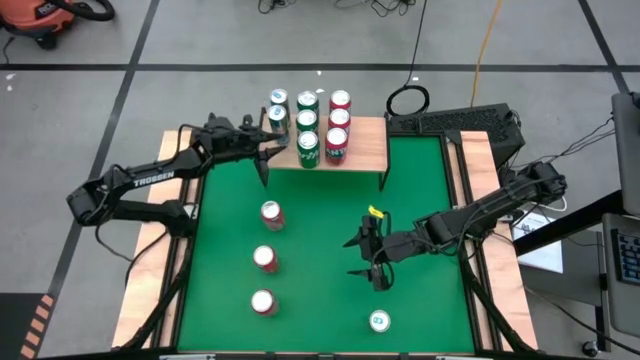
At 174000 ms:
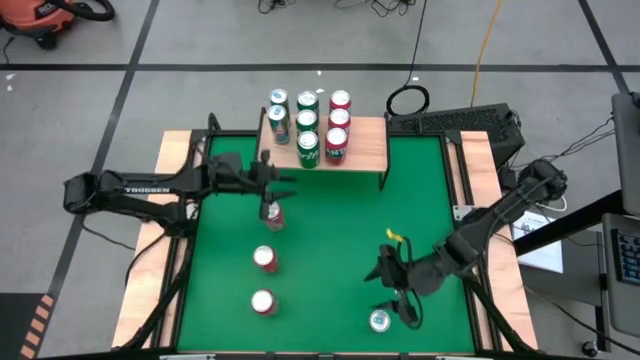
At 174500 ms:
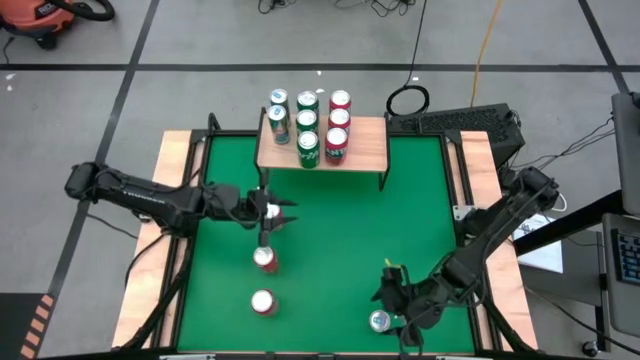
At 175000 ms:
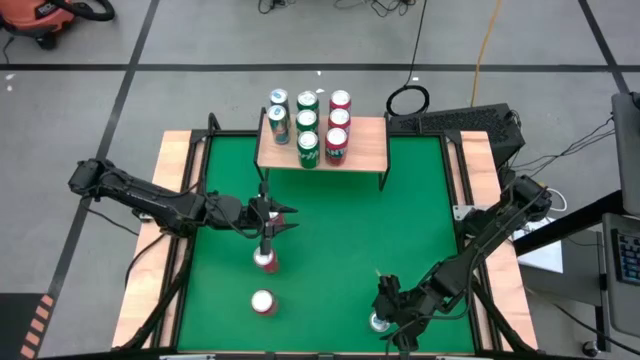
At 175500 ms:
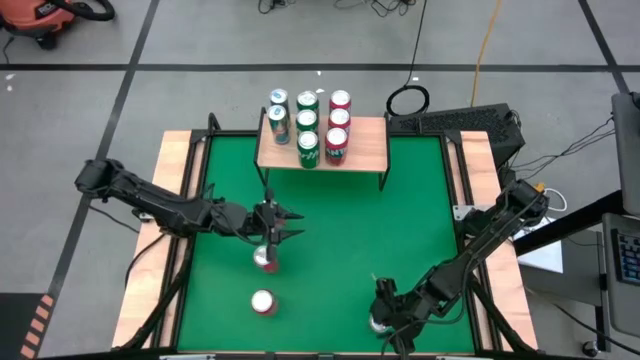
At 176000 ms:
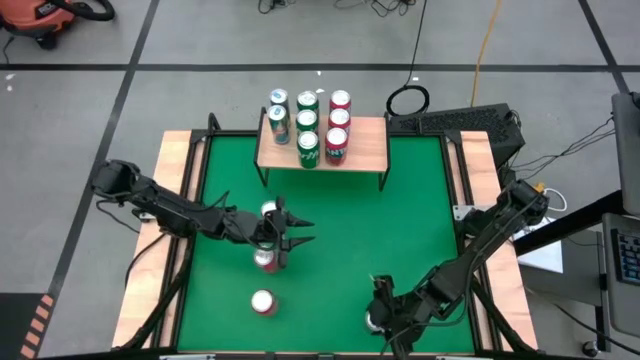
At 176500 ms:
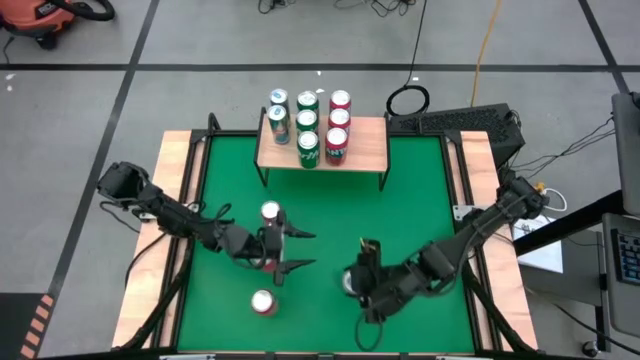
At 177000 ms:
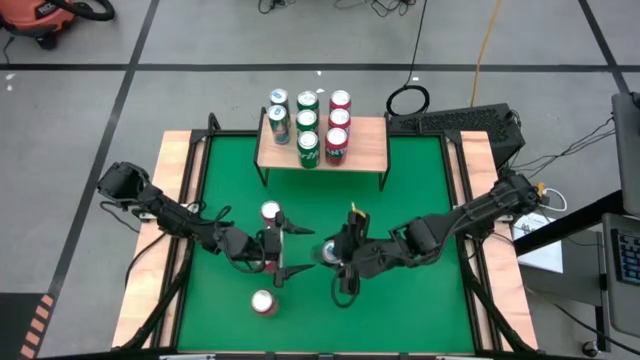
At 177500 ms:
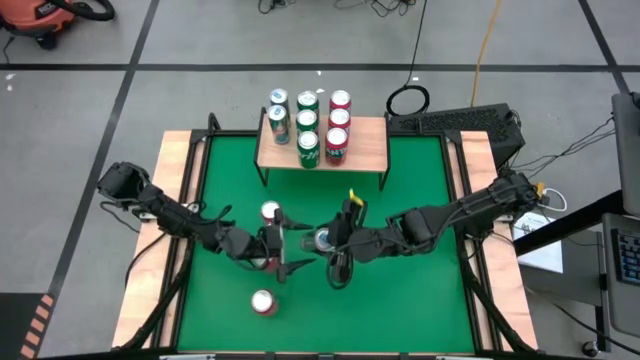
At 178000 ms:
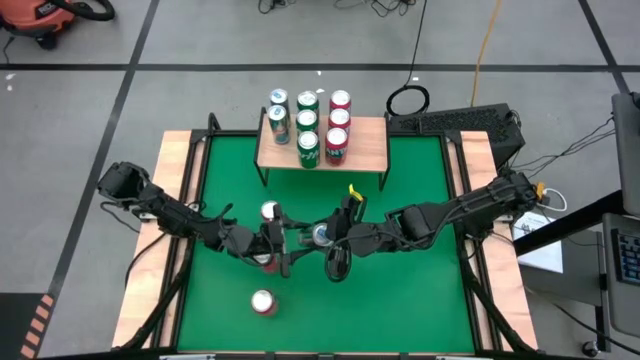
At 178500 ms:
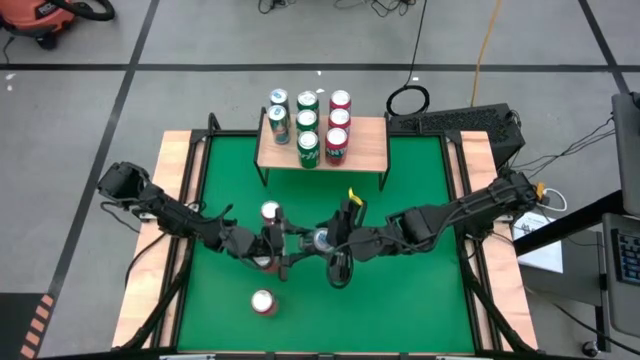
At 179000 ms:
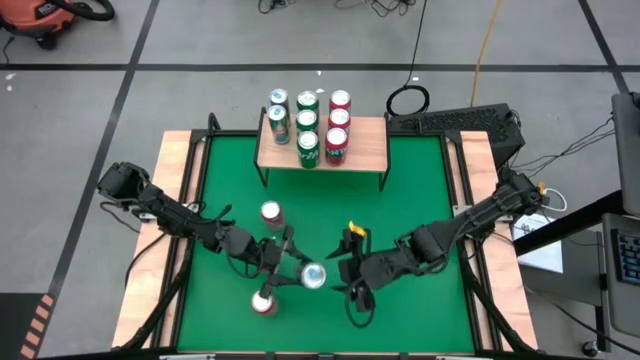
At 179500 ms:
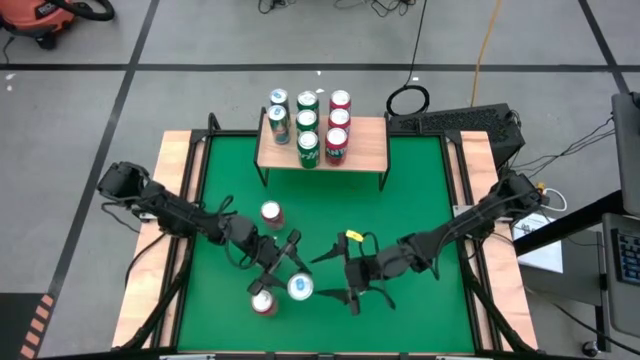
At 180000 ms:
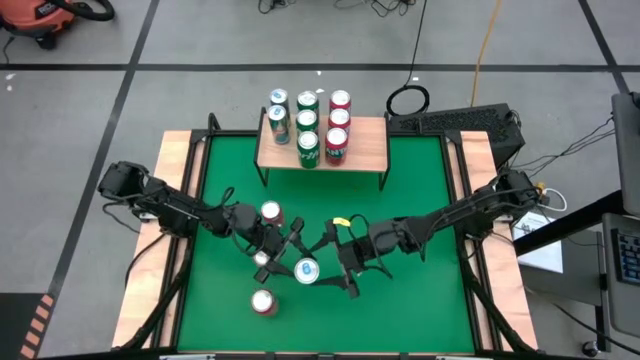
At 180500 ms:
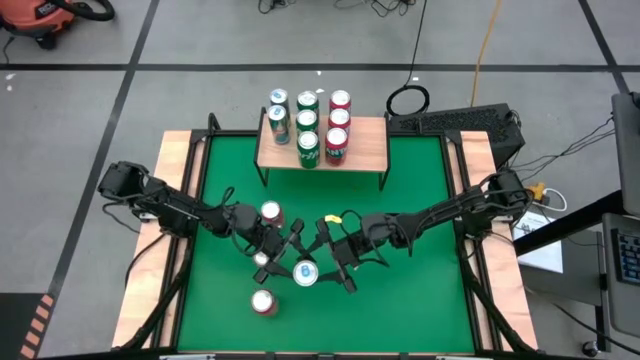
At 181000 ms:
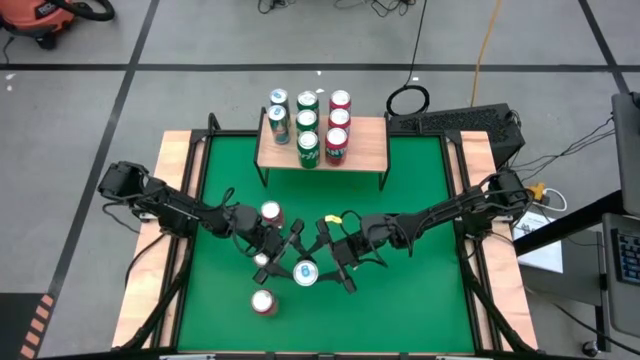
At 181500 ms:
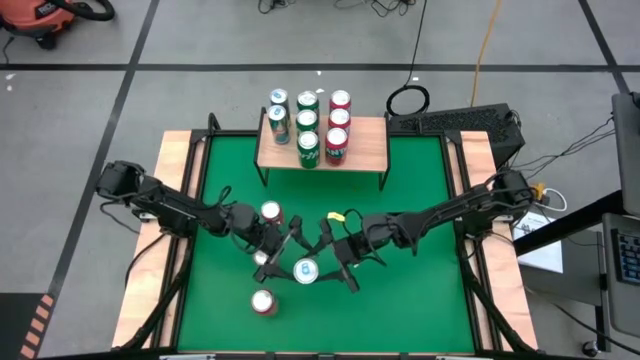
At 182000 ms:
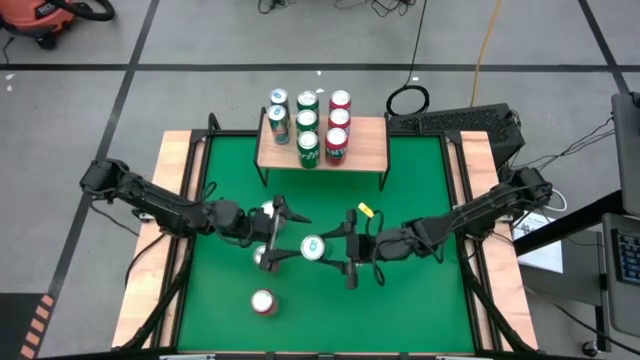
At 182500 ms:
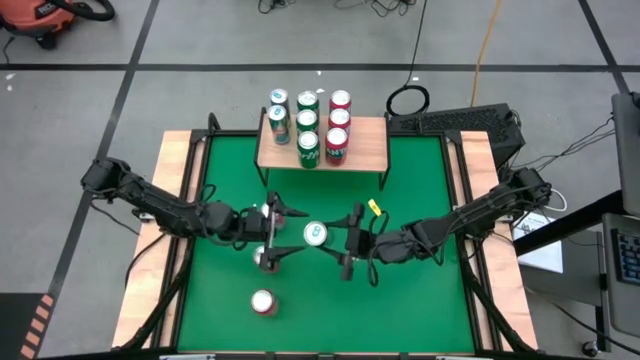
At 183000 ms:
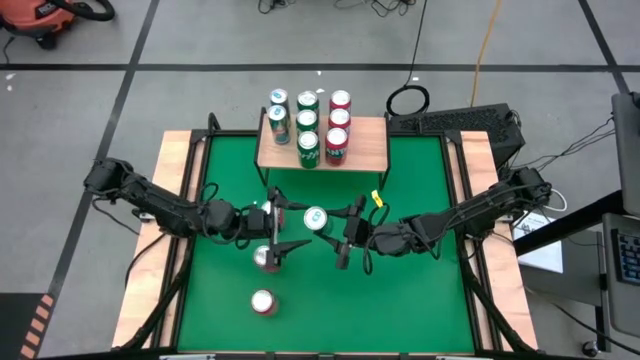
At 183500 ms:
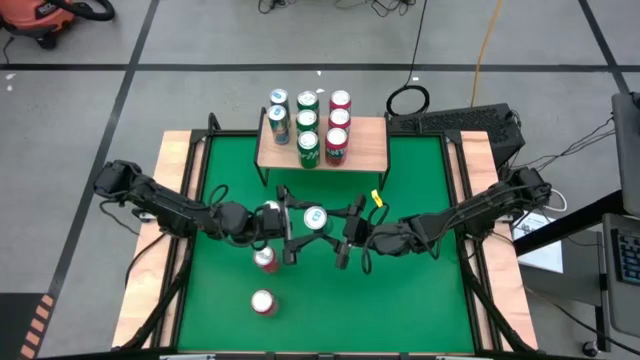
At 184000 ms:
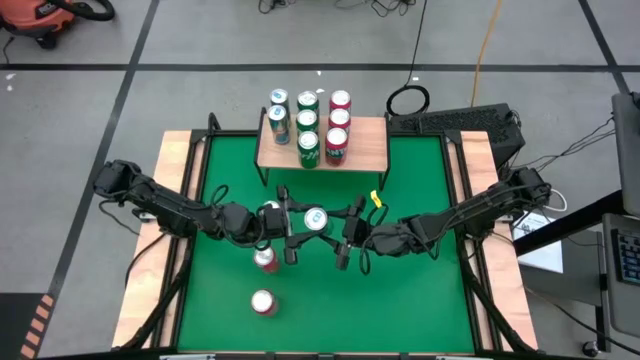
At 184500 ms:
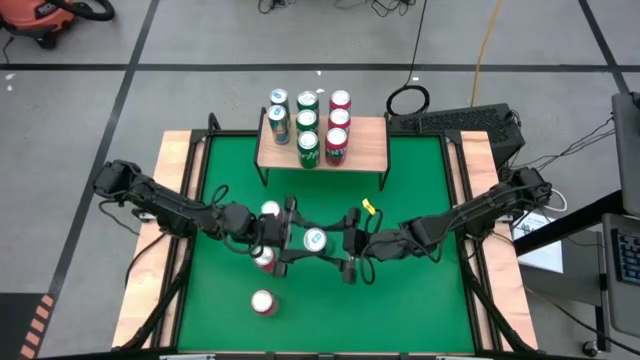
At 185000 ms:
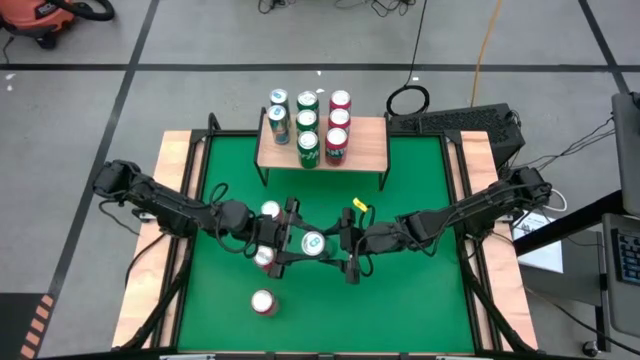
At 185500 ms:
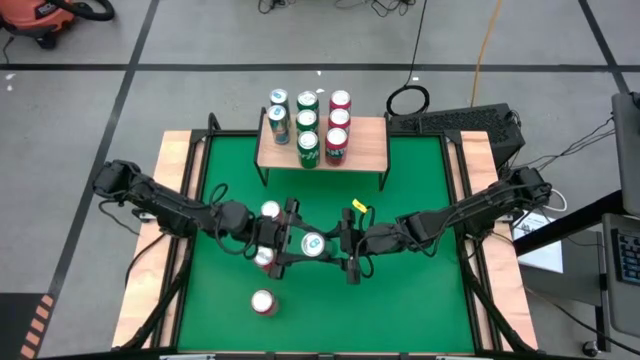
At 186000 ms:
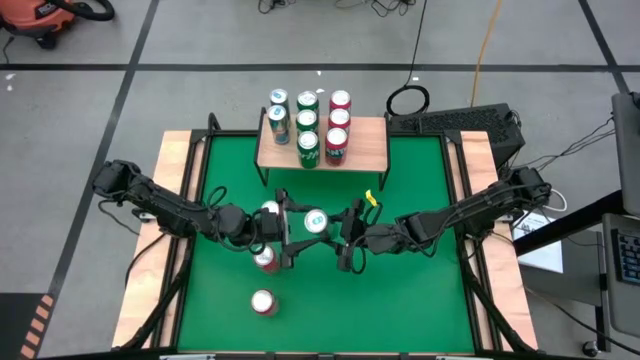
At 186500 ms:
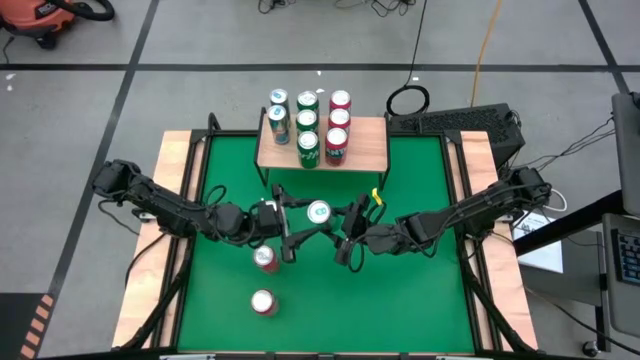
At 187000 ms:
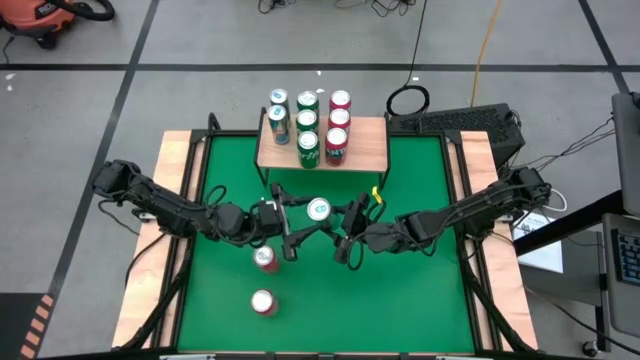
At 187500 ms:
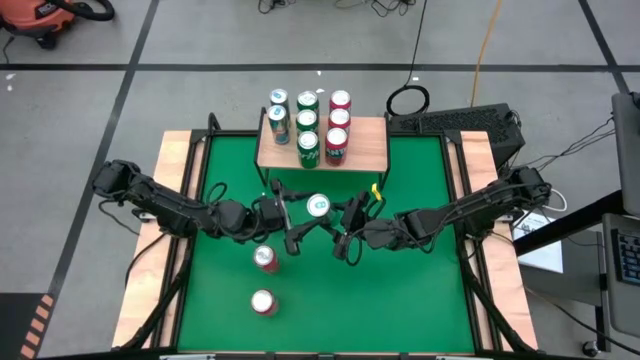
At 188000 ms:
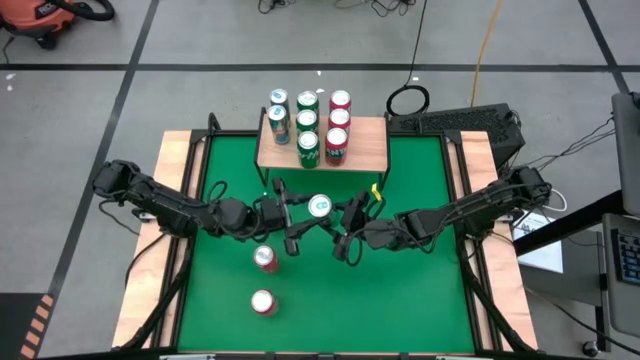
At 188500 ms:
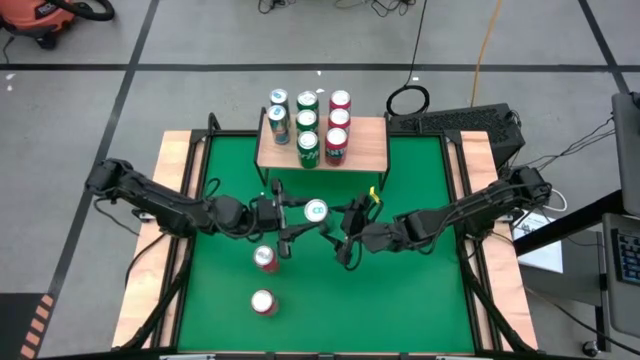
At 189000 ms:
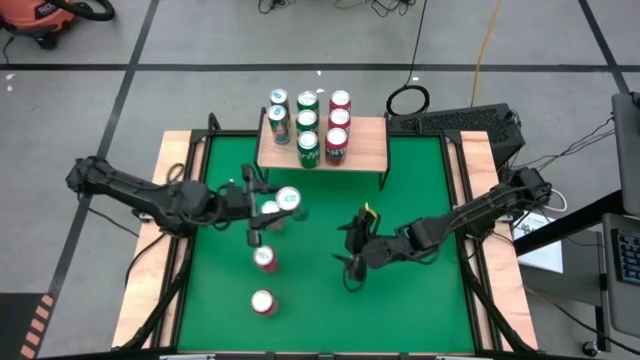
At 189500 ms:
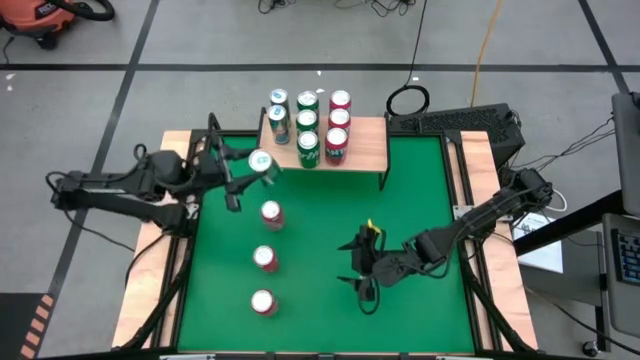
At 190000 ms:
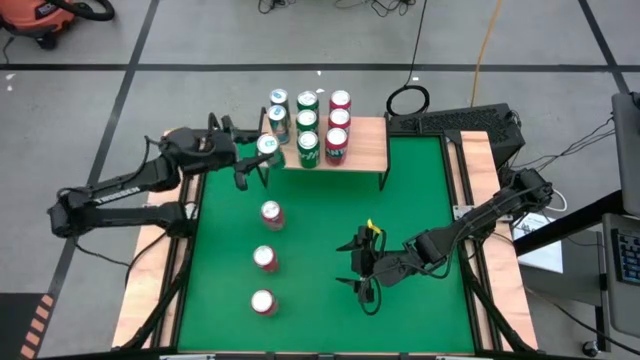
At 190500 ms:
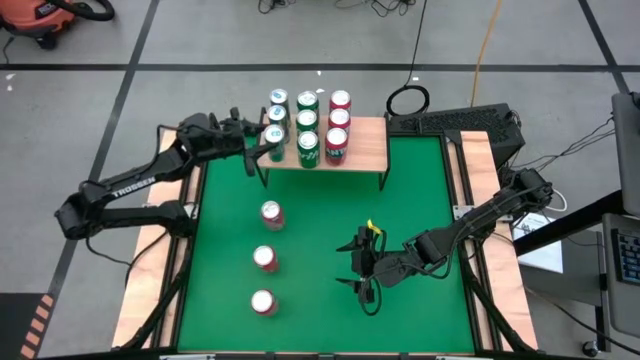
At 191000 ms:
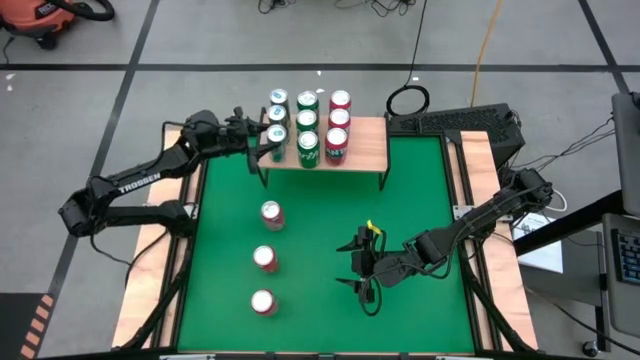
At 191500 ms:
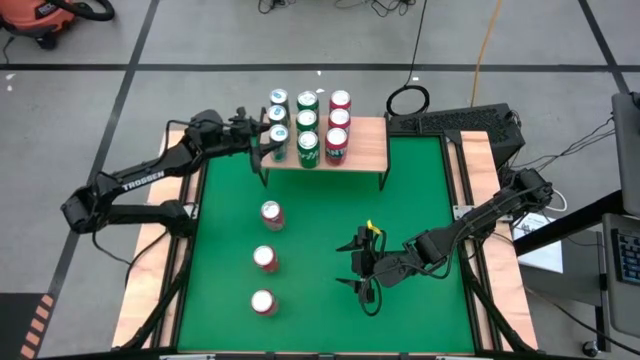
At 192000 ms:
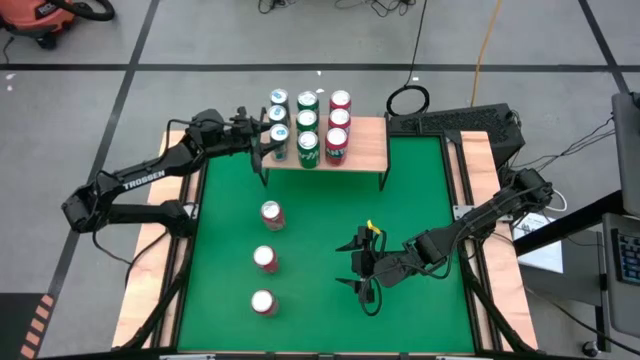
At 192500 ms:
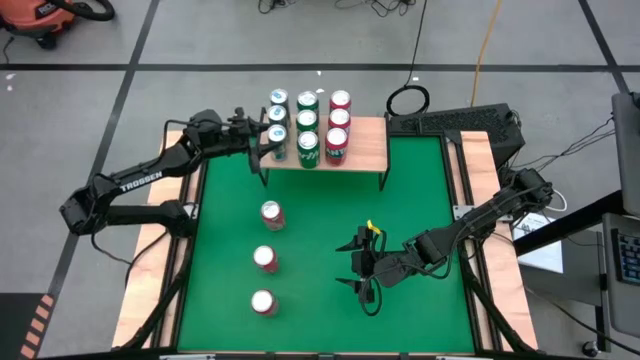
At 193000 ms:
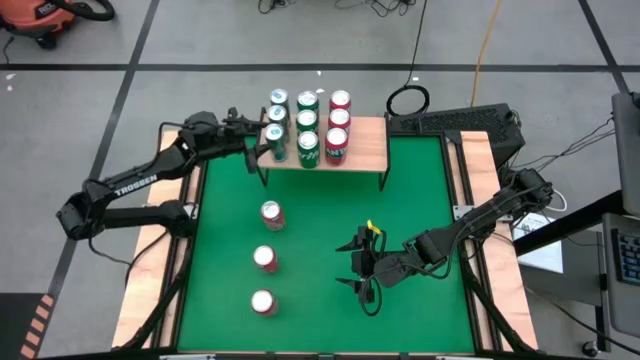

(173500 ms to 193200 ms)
Task: Place canned beverage on shelf
Put the blue soda can on the shelf aligned with the other blue soda can

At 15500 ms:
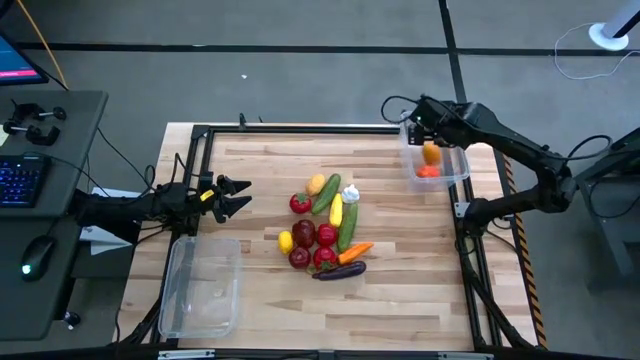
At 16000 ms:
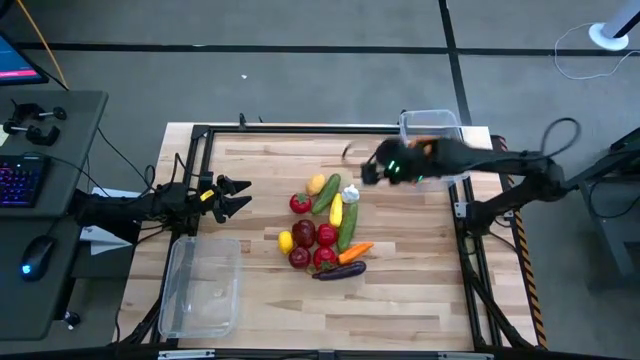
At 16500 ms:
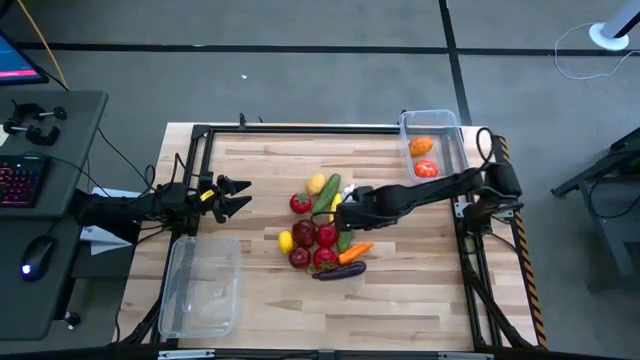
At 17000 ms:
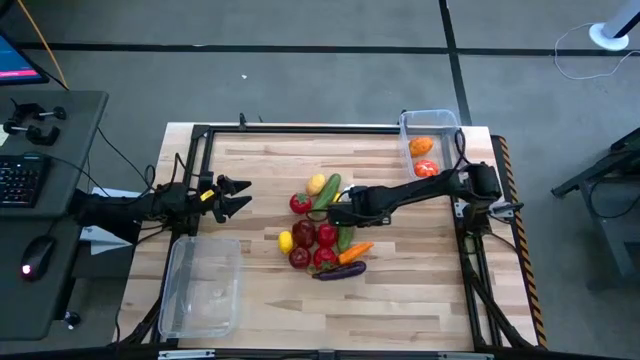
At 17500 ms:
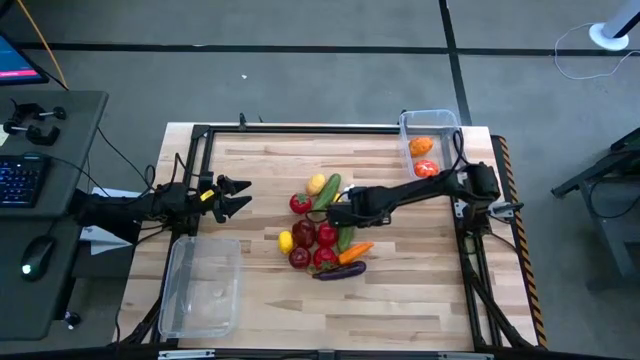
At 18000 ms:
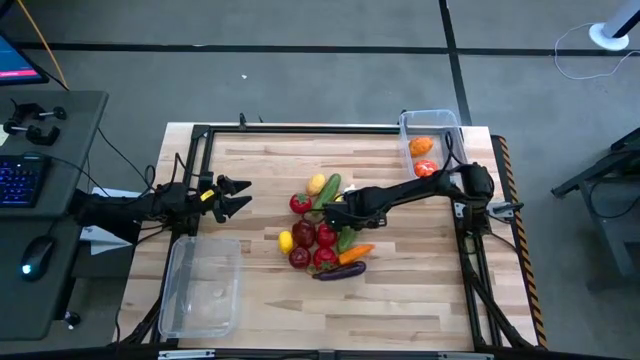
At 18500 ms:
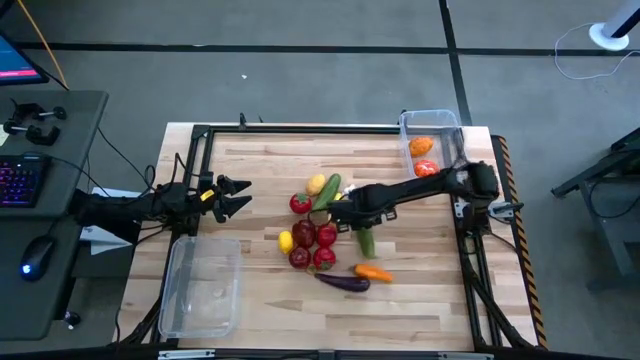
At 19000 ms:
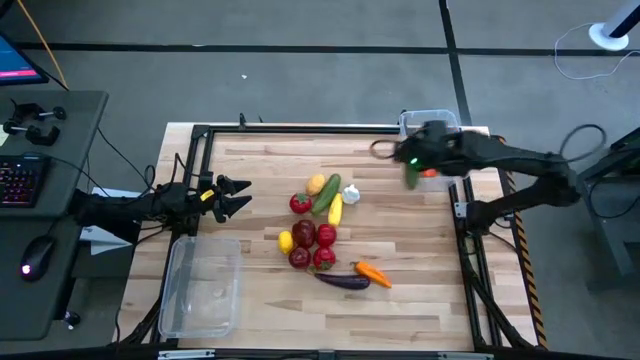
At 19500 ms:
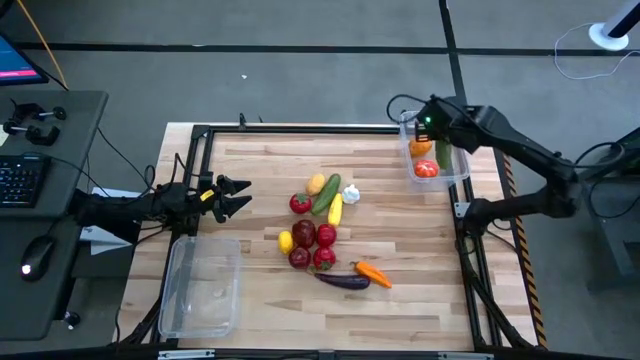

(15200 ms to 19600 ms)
Task: Sort produce into baskets
Put the bottom green cucumber into the top transparent bin
